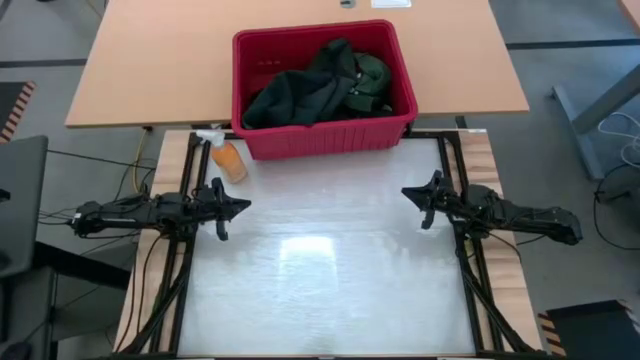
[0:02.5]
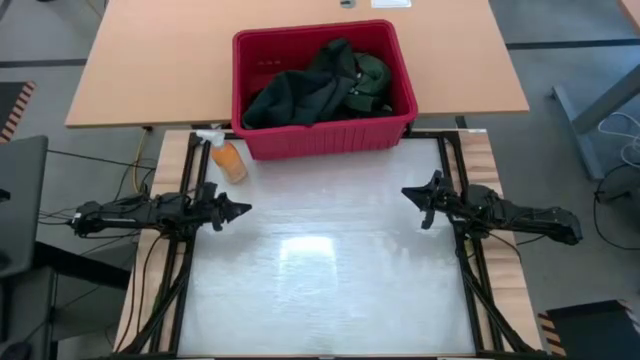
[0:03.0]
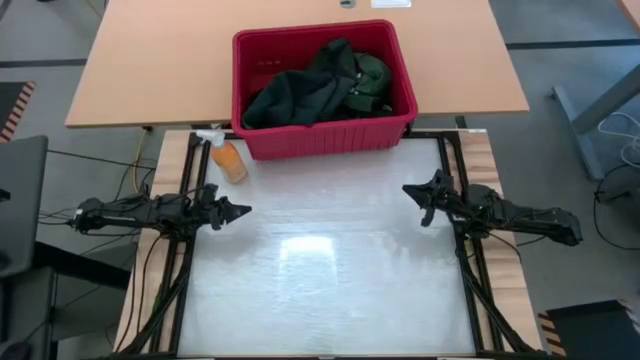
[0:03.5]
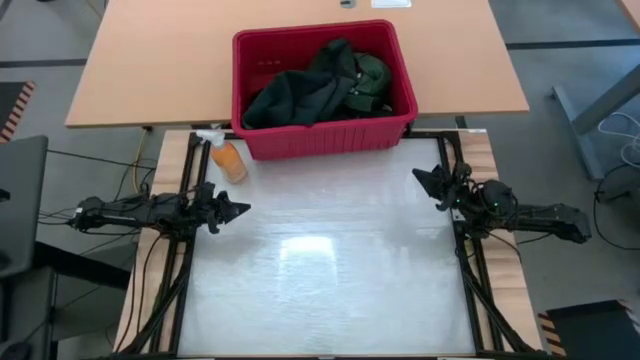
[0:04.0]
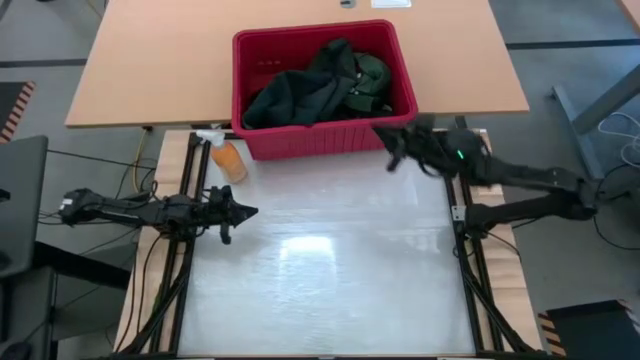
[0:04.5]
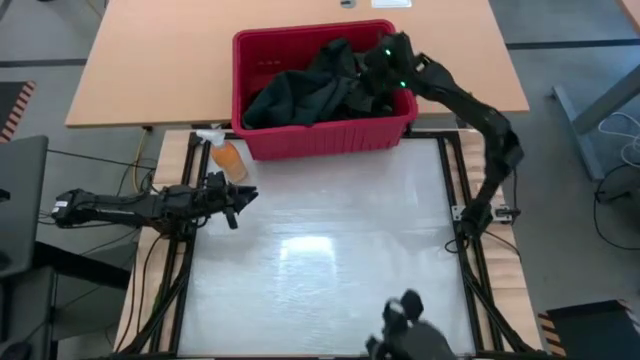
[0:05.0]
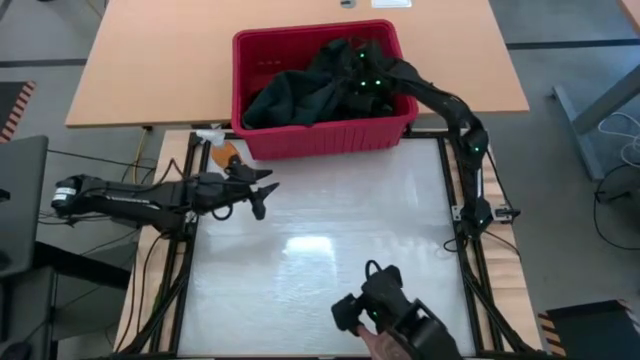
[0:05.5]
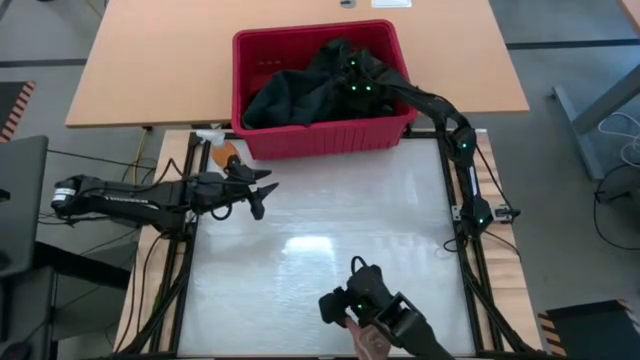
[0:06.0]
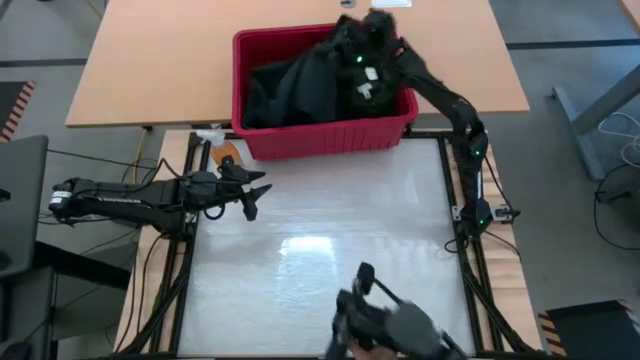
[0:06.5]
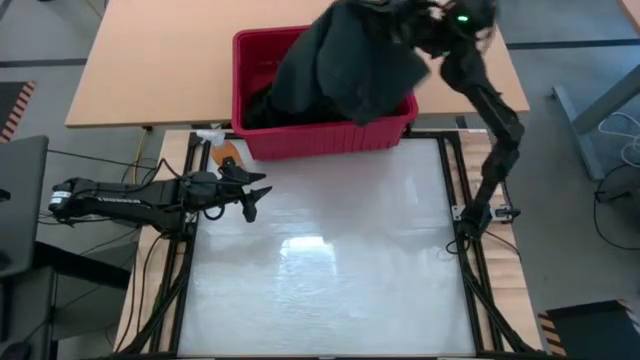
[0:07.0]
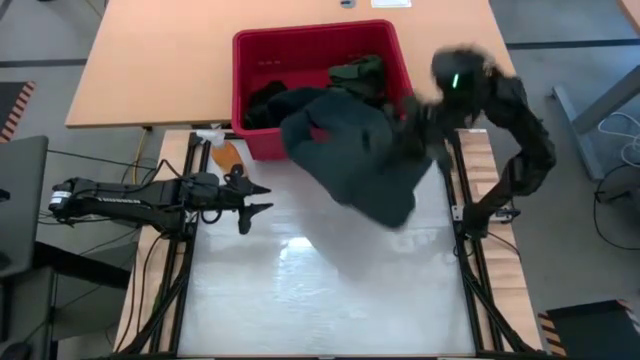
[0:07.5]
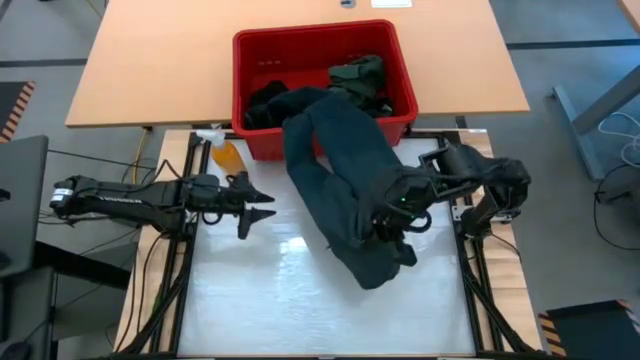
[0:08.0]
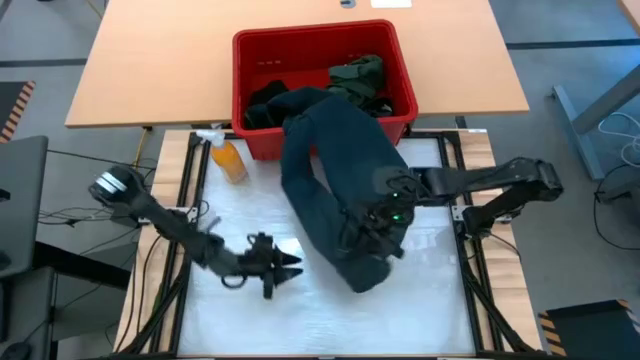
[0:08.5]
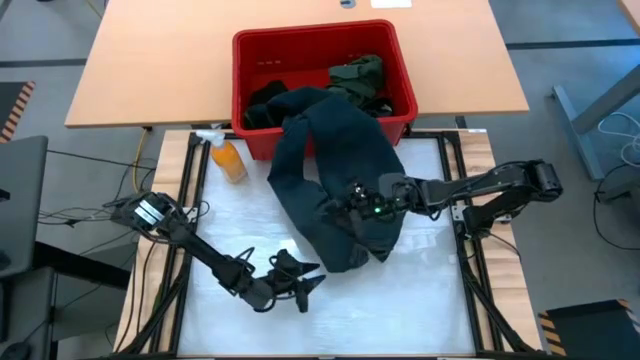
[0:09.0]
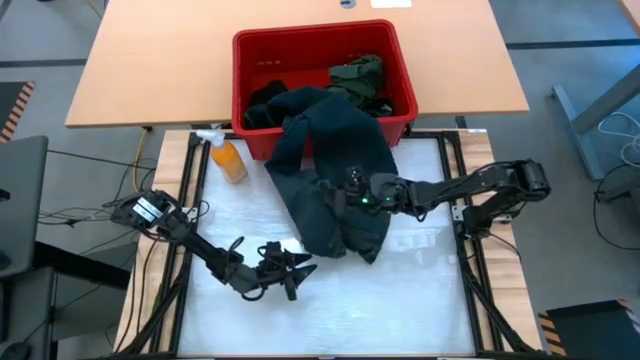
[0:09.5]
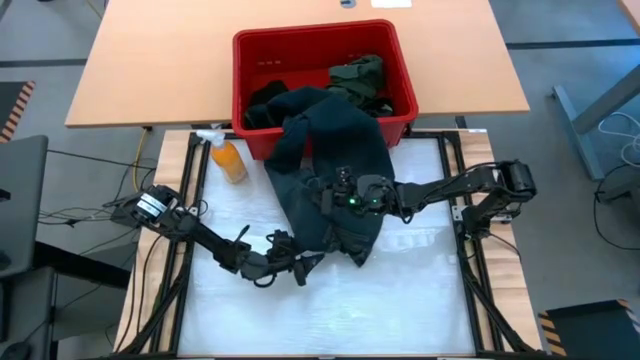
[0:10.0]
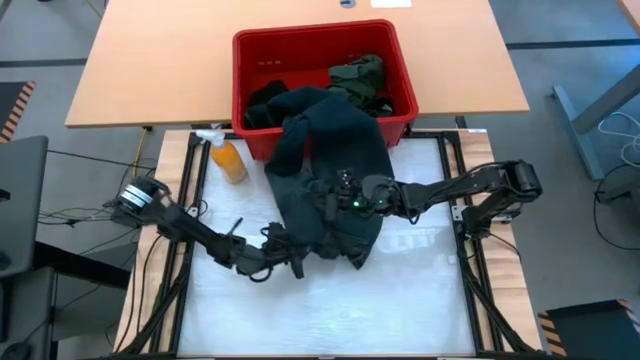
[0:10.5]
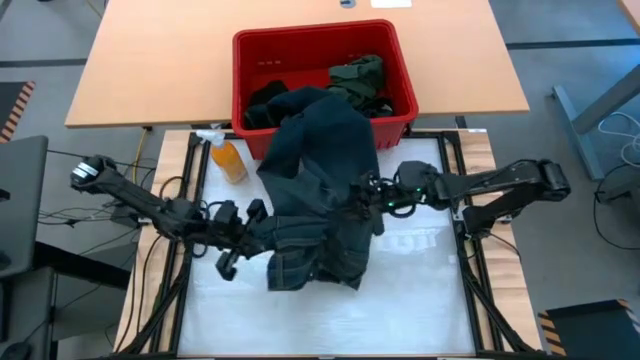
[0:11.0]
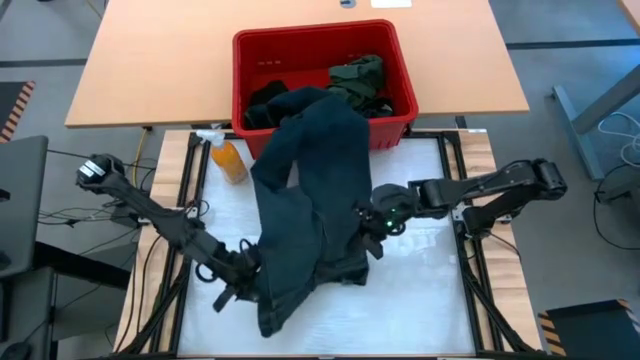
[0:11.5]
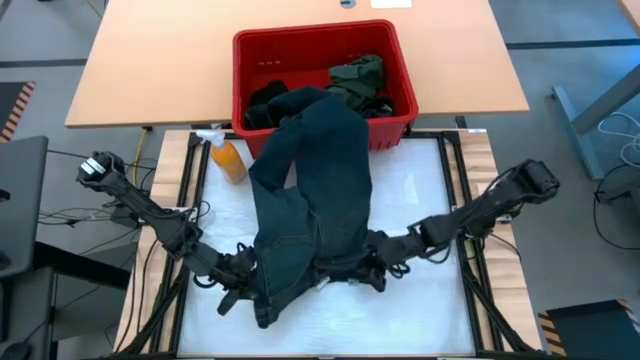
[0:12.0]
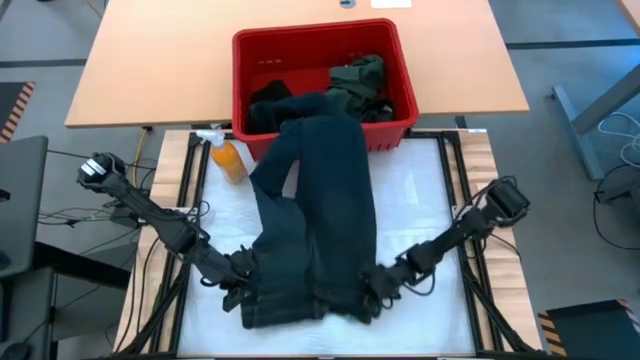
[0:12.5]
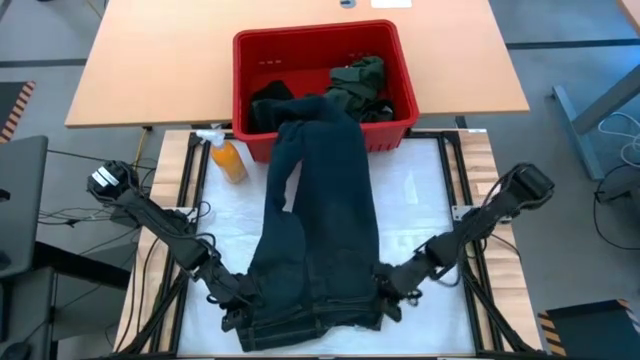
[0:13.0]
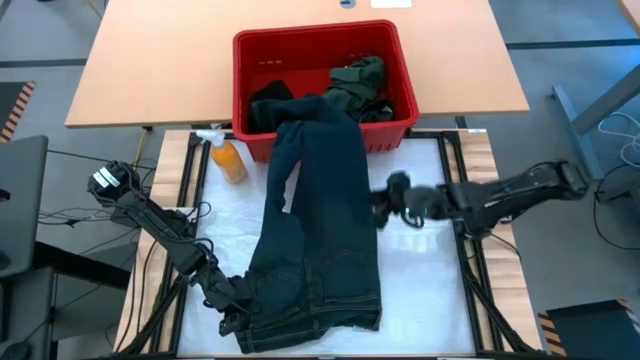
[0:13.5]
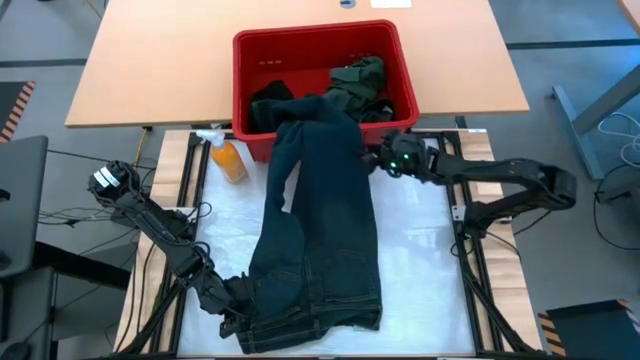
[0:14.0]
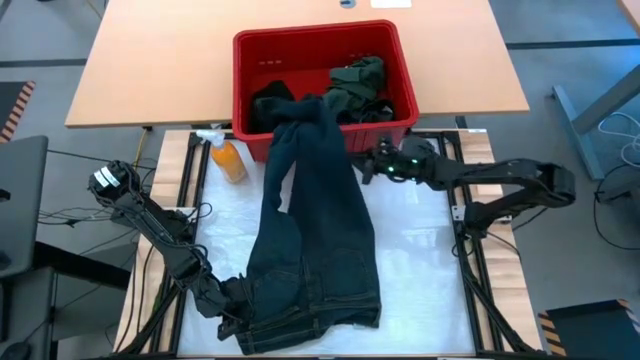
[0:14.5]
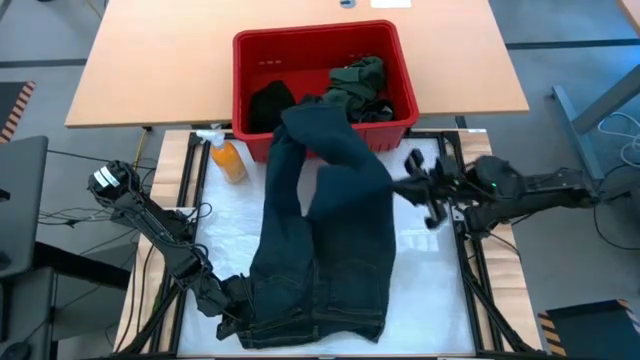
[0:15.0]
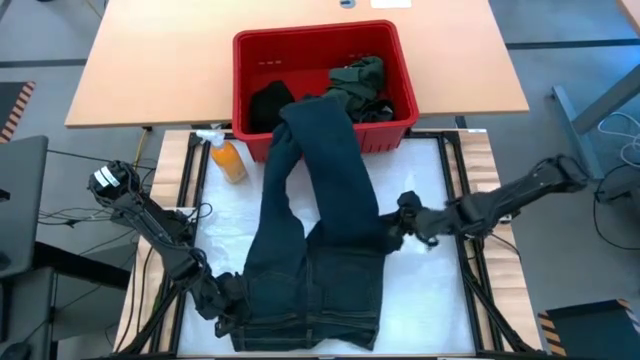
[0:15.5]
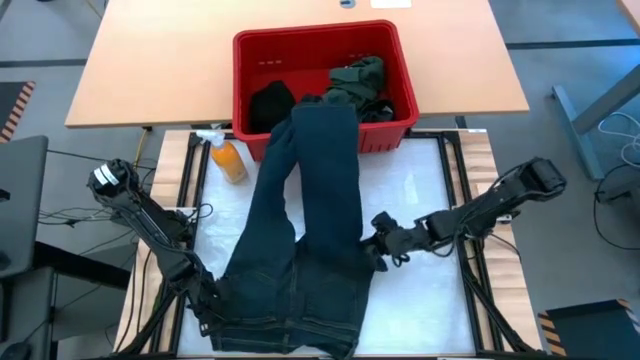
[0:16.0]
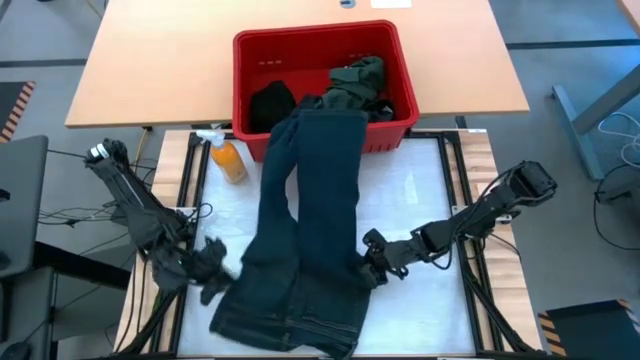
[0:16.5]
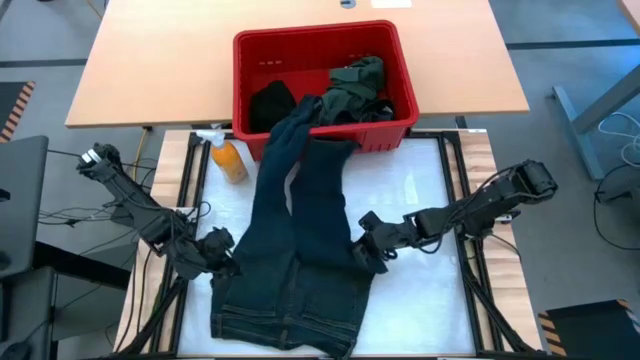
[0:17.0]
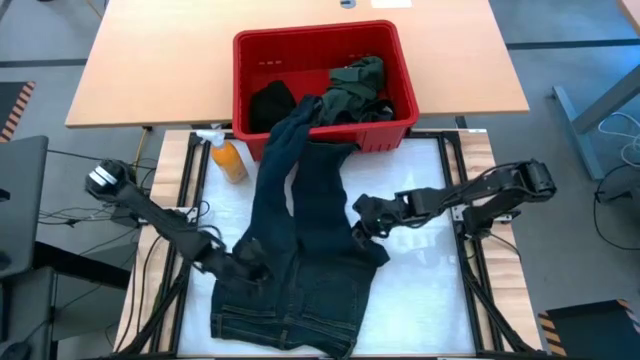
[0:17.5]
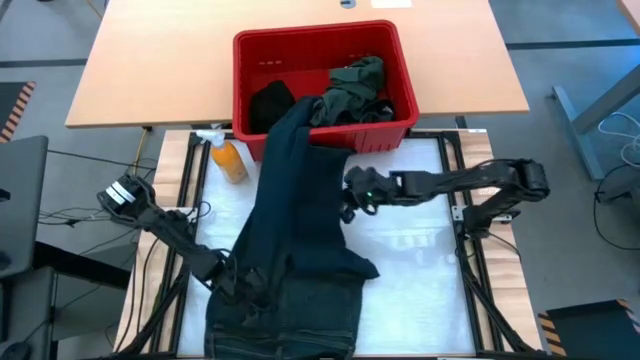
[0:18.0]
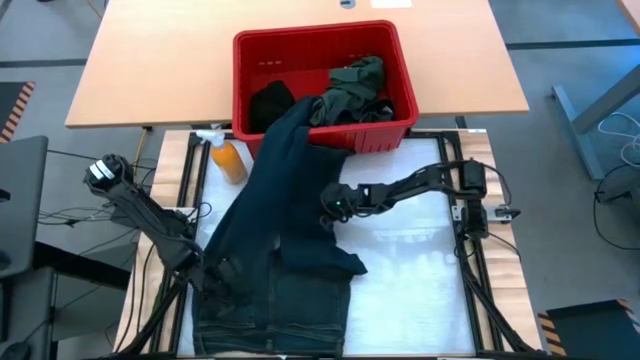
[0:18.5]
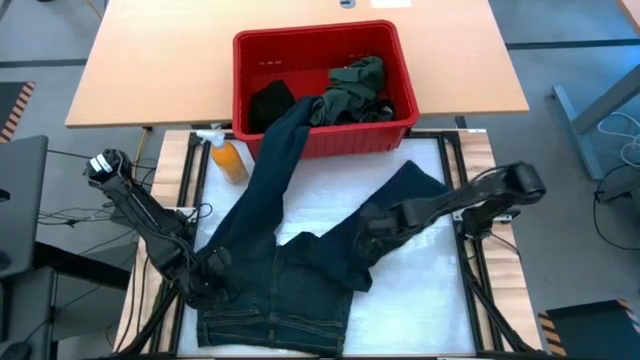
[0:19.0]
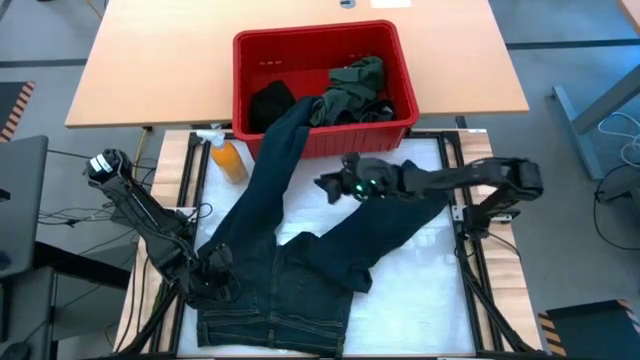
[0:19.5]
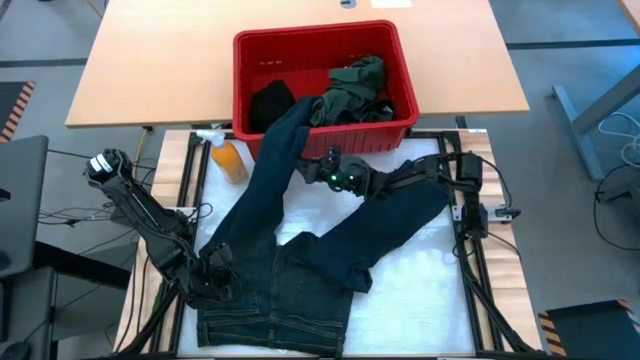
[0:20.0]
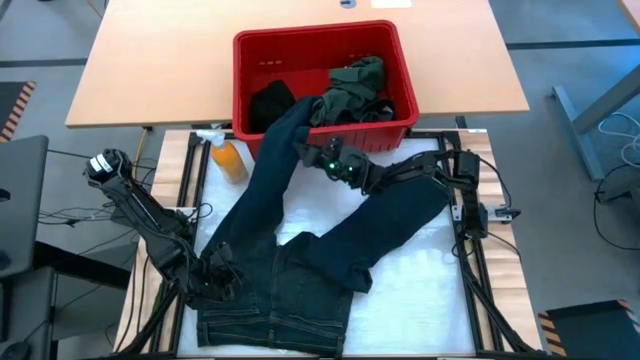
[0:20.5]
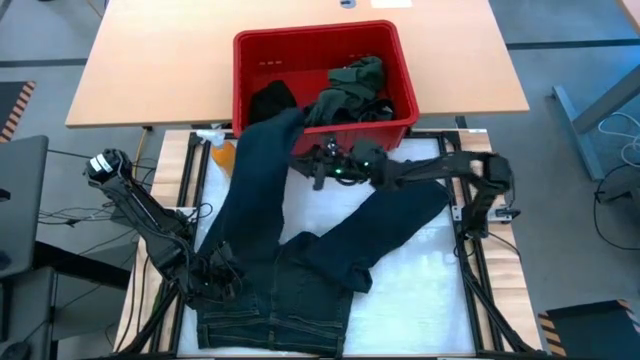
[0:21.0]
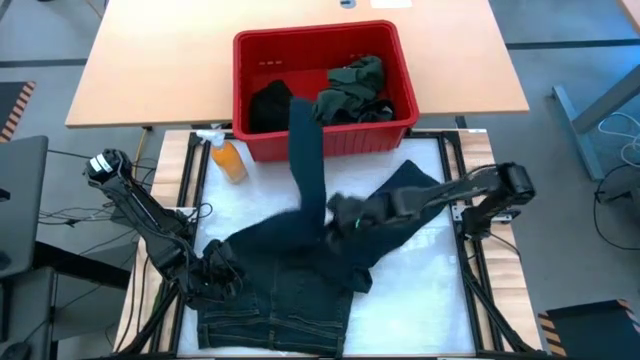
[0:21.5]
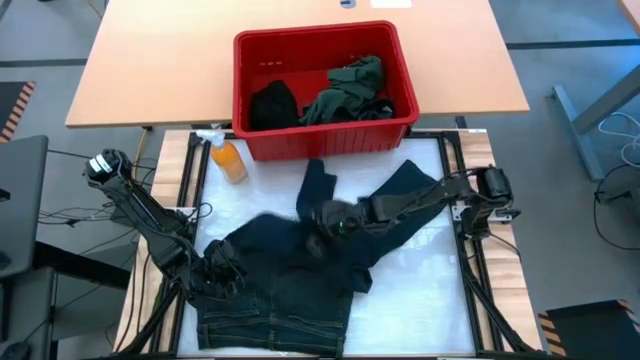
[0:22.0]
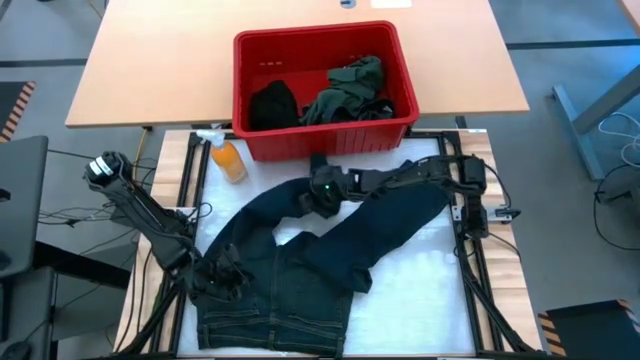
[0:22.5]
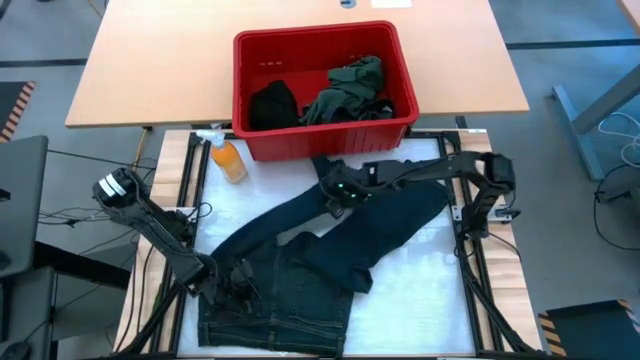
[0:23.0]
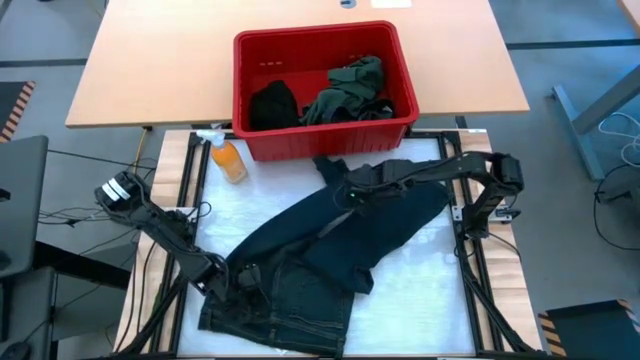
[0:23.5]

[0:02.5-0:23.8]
Task: Fold Laundry from Bin
Remove the dark blue pants from the red bin
